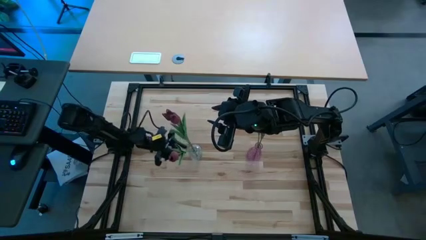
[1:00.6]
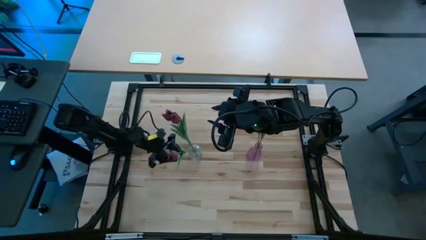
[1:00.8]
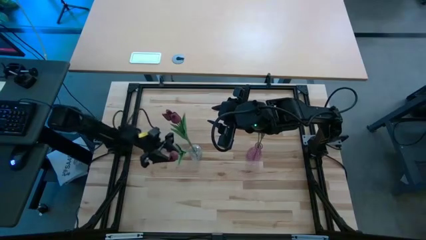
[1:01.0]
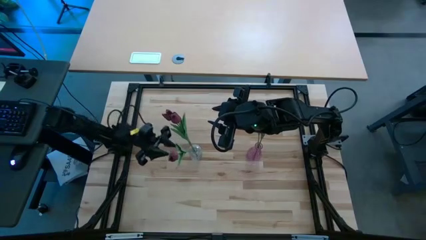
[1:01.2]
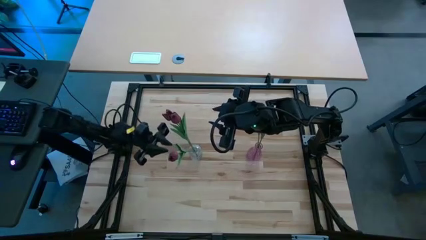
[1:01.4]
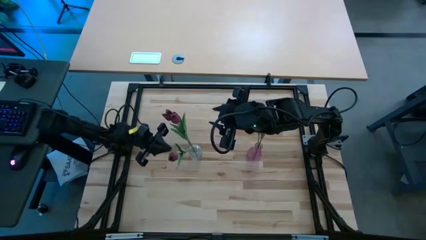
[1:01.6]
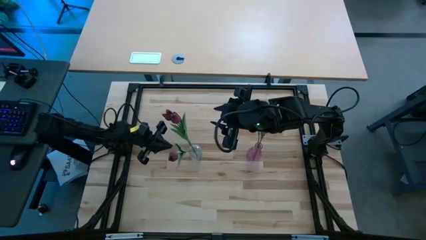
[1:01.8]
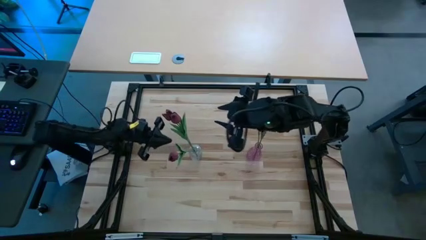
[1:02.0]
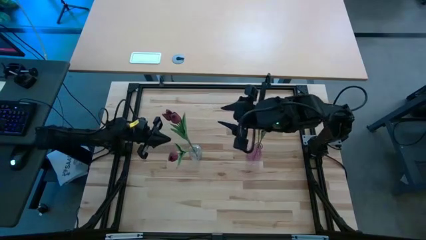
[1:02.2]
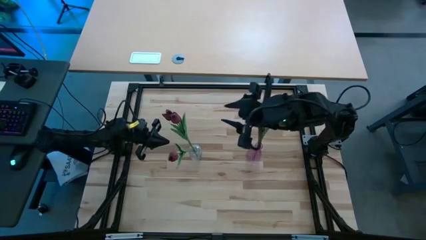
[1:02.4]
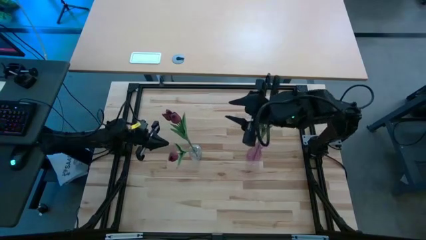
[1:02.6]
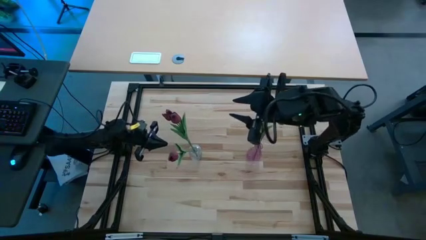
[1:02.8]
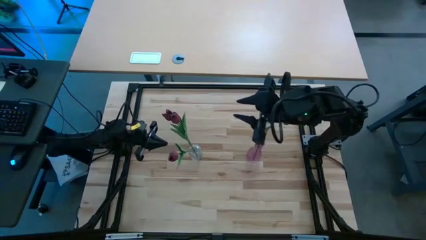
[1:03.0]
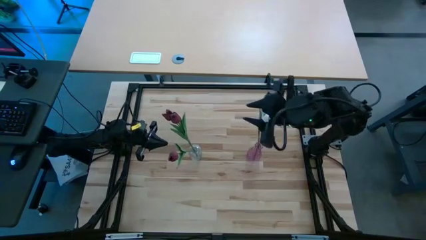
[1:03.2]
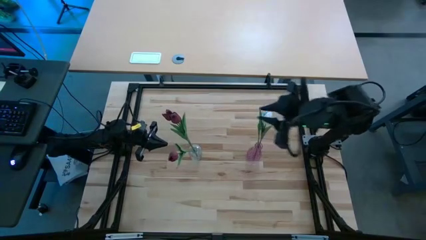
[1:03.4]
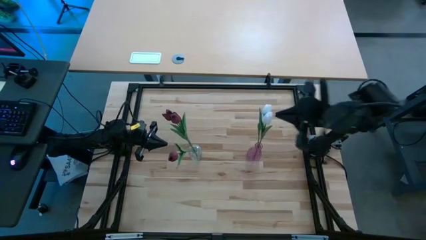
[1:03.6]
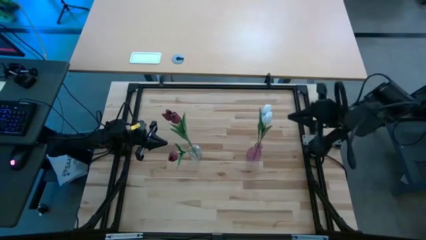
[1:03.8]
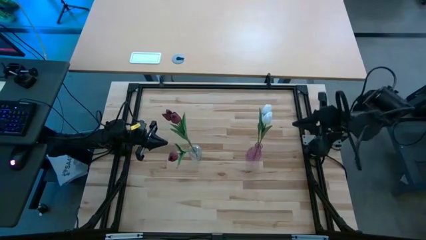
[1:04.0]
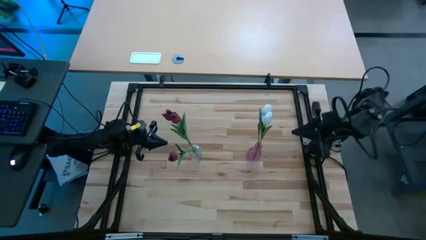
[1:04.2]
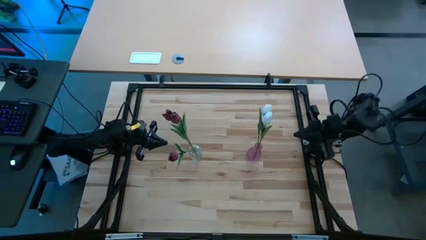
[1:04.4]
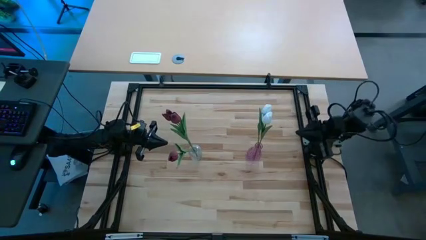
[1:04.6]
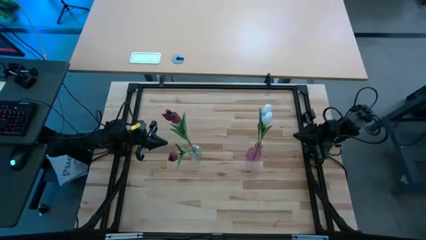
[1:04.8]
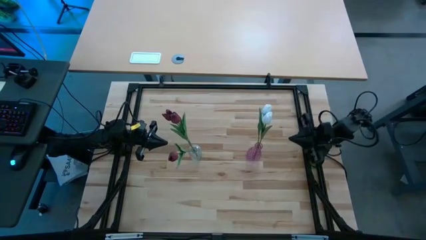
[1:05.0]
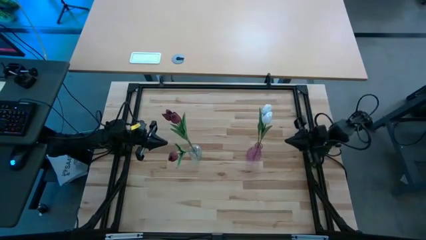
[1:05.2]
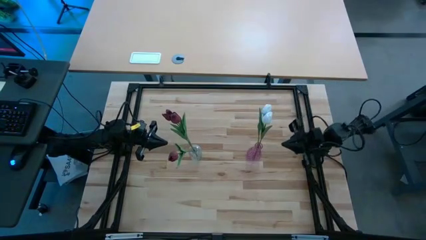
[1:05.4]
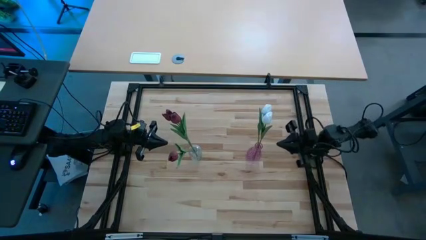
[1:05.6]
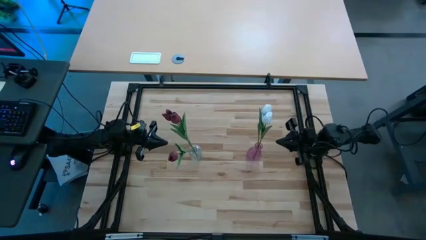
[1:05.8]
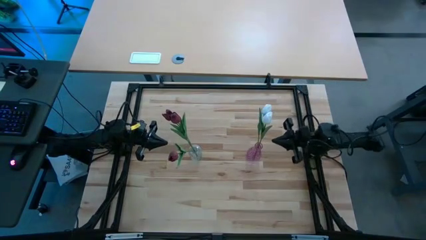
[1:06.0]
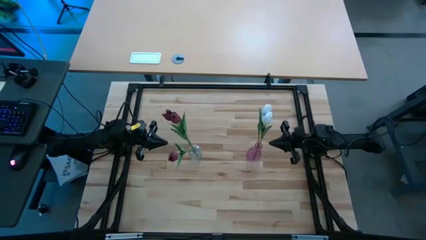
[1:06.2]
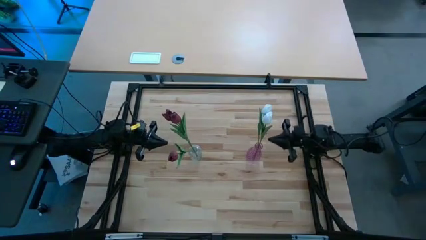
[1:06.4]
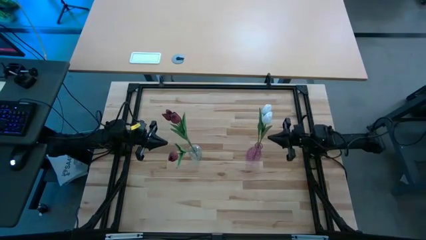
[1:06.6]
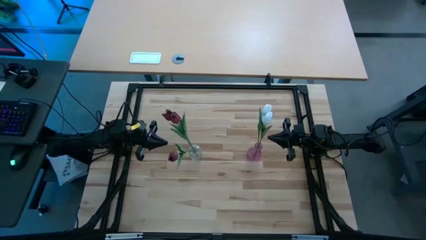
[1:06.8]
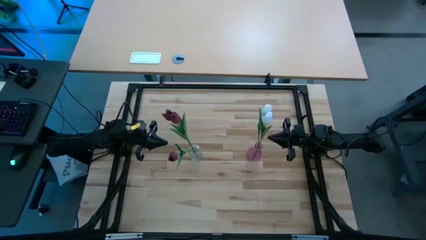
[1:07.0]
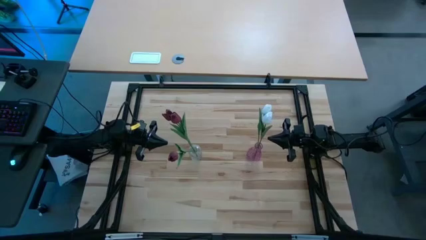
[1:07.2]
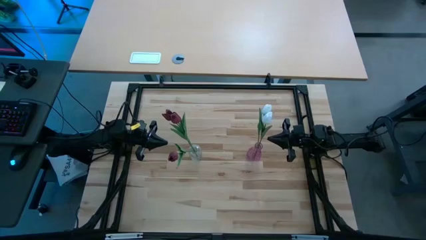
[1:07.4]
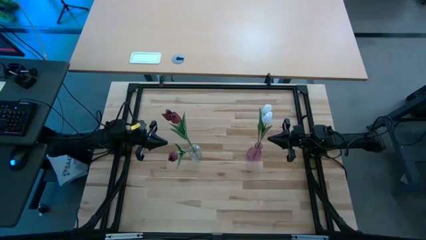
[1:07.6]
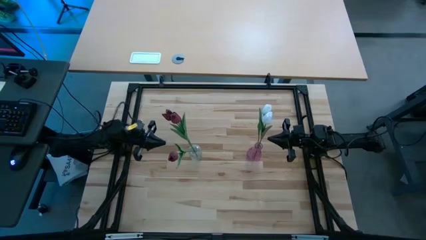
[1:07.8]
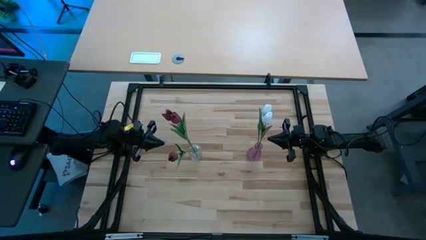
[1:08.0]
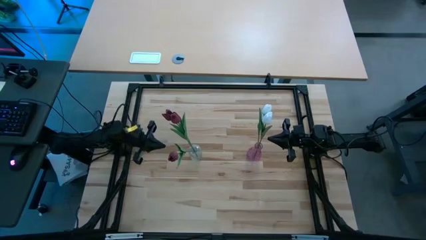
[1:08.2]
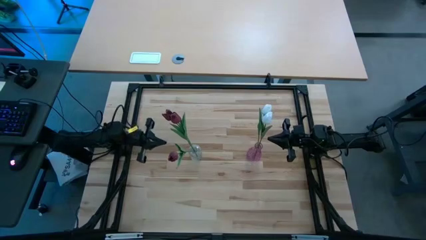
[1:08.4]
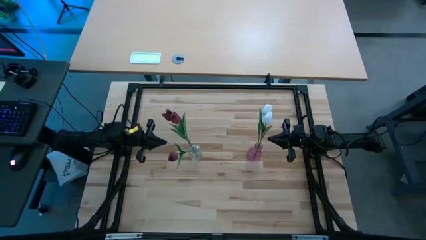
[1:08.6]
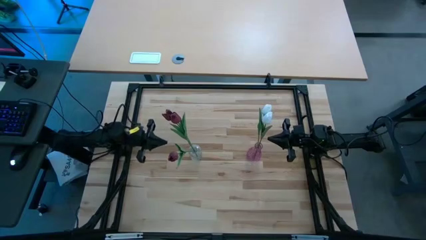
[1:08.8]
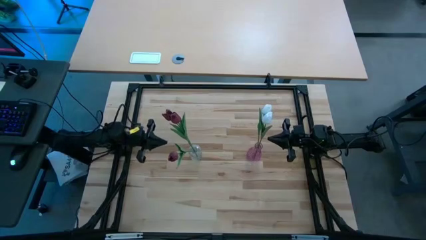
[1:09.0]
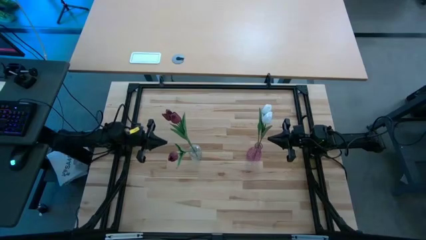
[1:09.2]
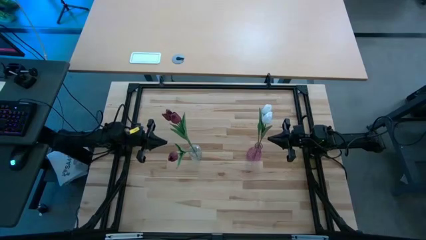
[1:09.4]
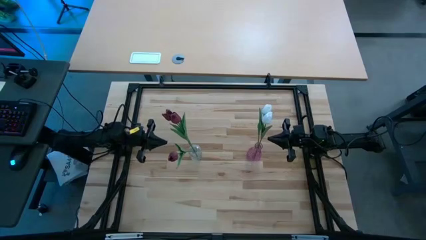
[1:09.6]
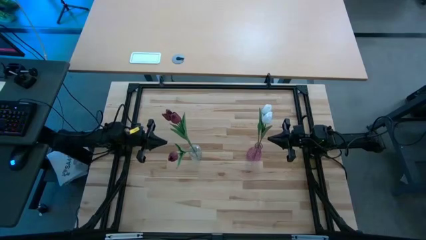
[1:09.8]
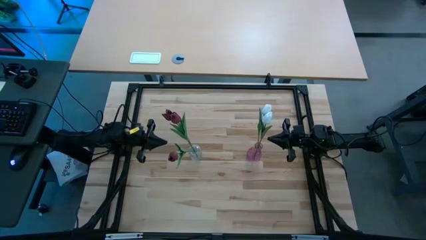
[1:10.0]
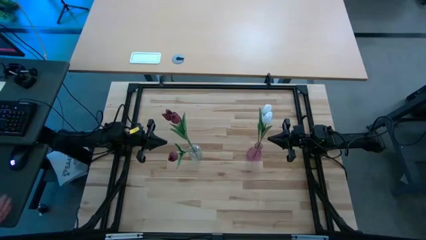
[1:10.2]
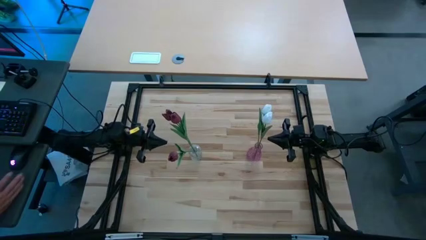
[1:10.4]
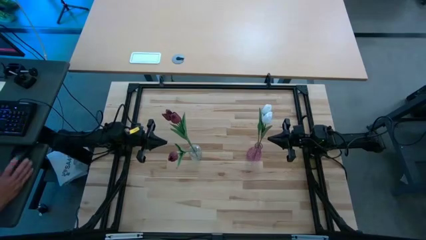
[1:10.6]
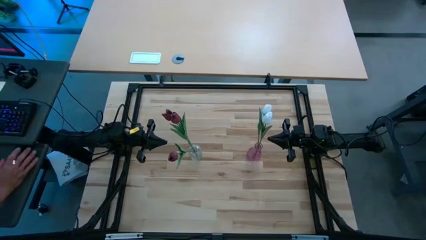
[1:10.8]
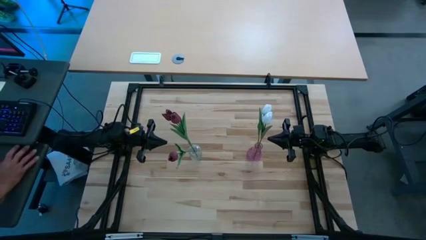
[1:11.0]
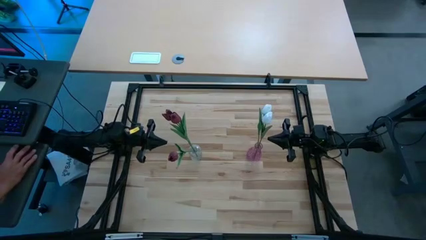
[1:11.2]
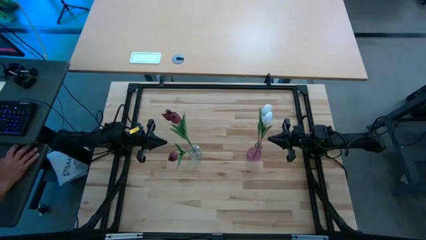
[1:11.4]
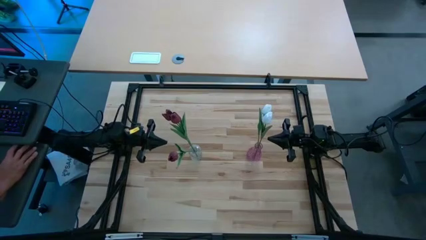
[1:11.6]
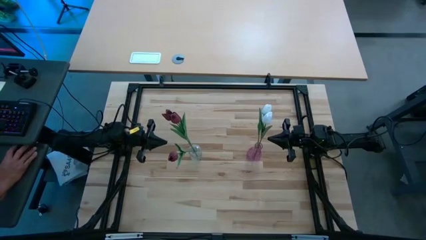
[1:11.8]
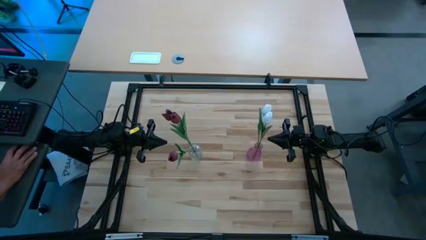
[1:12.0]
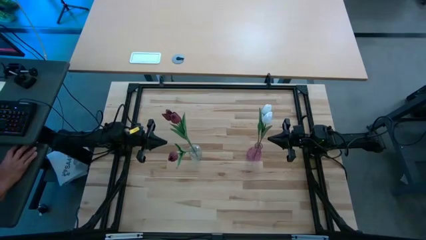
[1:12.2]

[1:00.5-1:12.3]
Task: Sort flowers into vase by color
Return to Home Position
